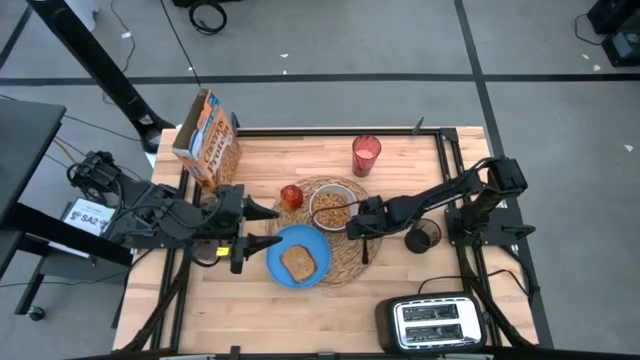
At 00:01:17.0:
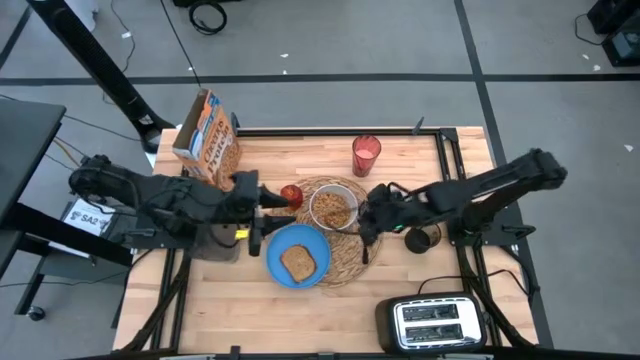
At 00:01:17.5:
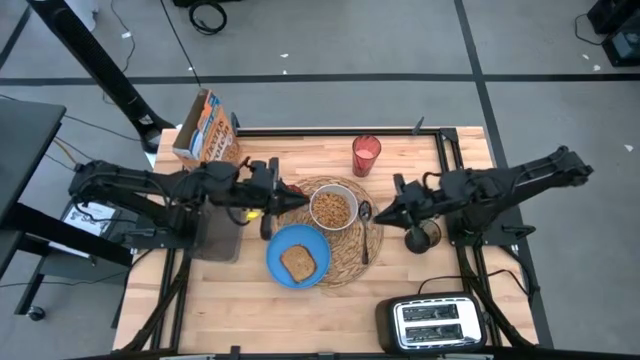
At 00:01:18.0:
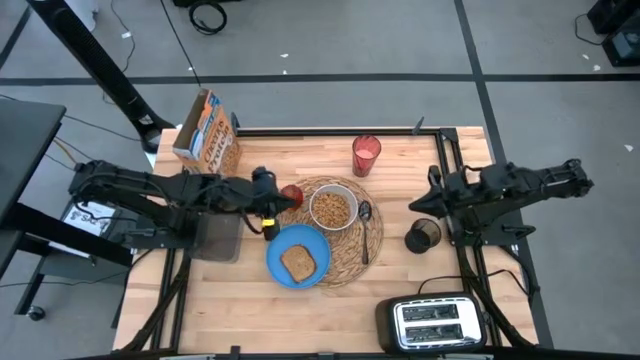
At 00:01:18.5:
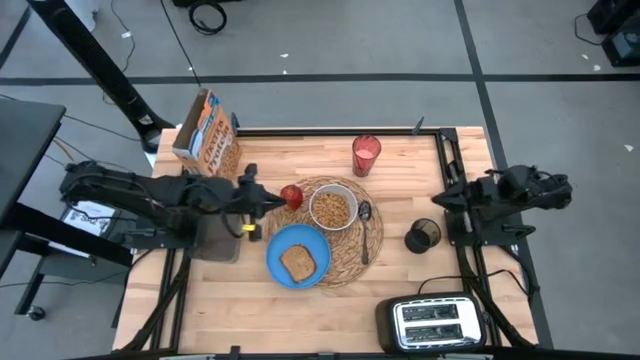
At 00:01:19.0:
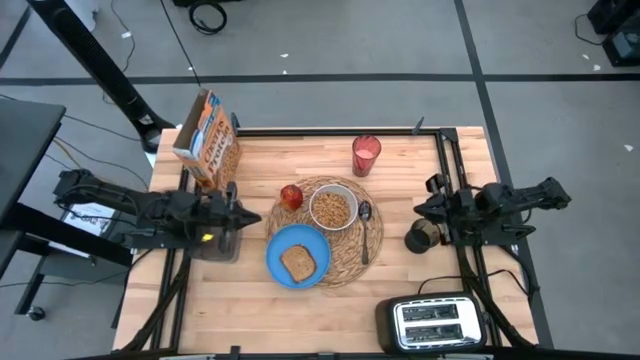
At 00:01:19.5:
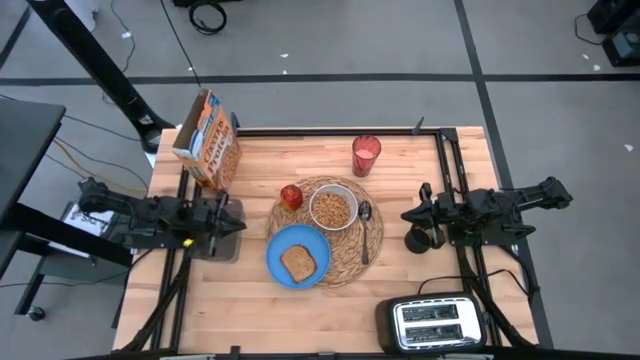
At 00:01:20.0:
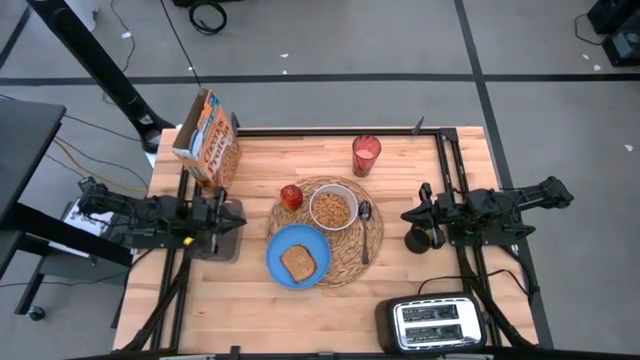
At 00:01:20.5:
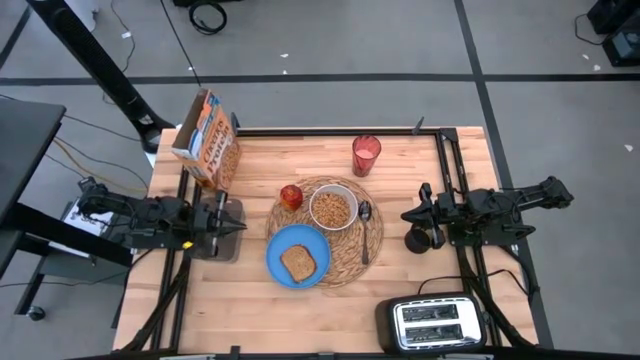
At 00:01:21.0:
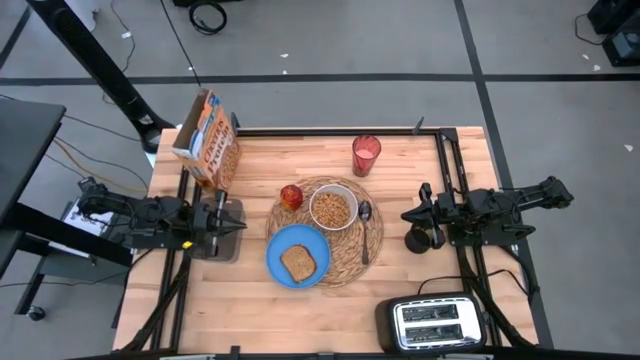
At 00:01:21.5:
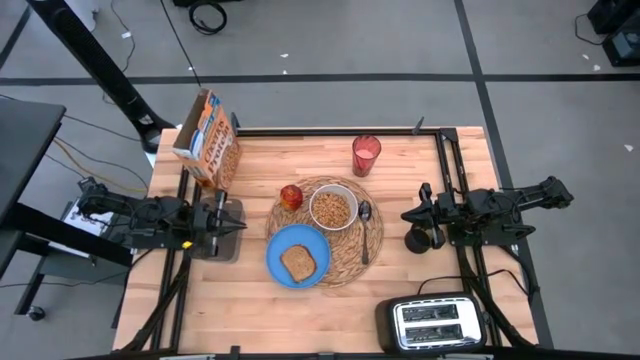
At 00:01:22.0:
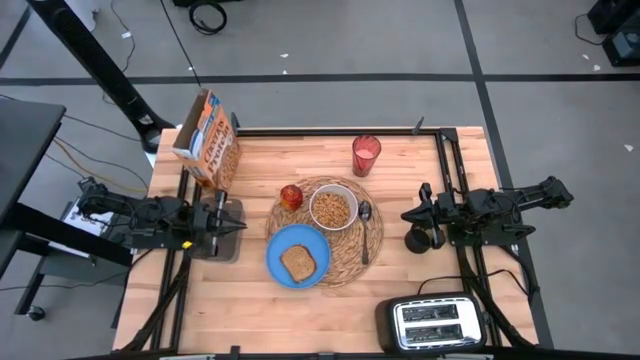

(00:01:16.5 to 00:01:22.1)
Task: Arrange a breakfast setting
Return to Home Position

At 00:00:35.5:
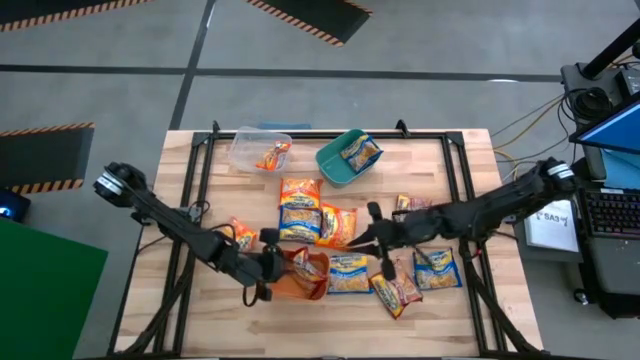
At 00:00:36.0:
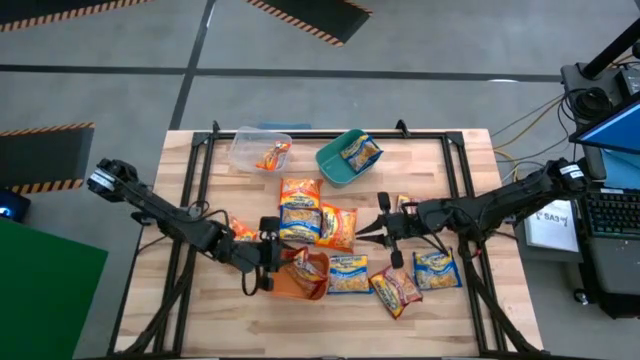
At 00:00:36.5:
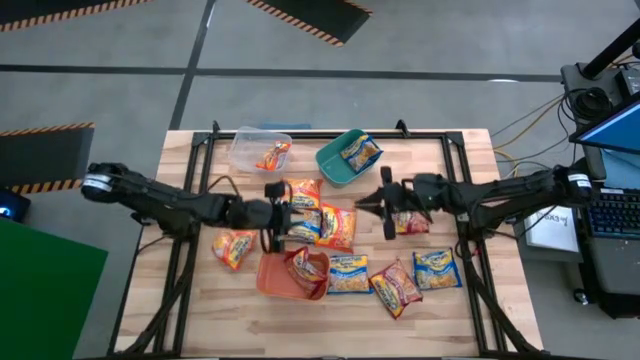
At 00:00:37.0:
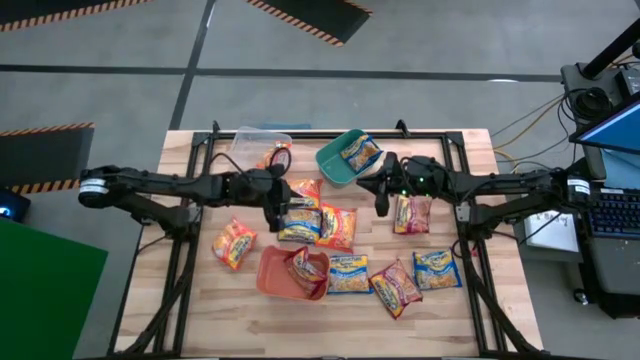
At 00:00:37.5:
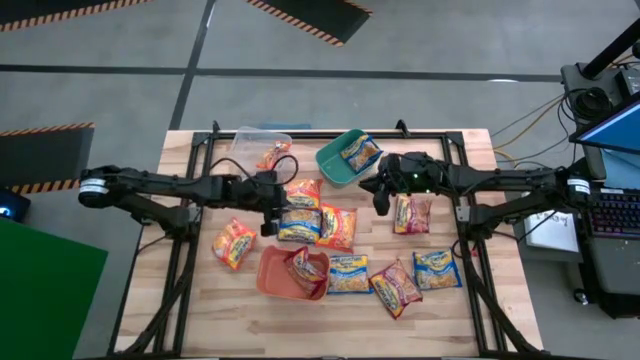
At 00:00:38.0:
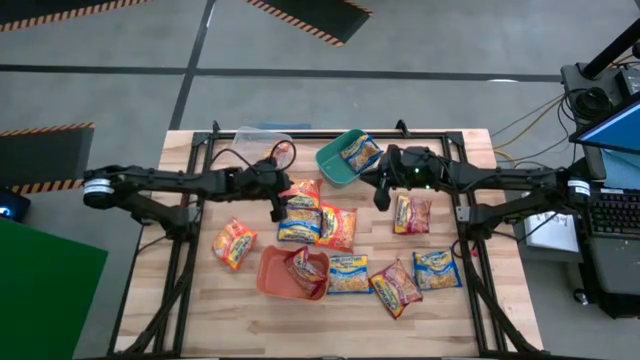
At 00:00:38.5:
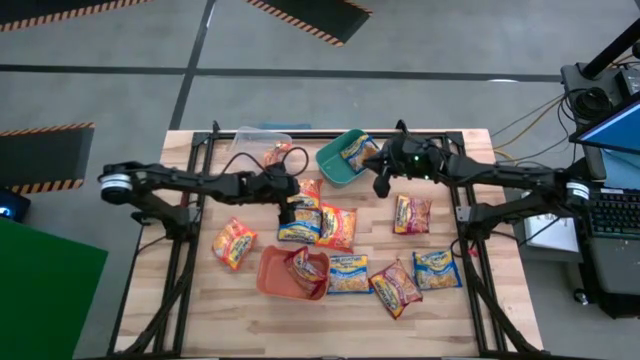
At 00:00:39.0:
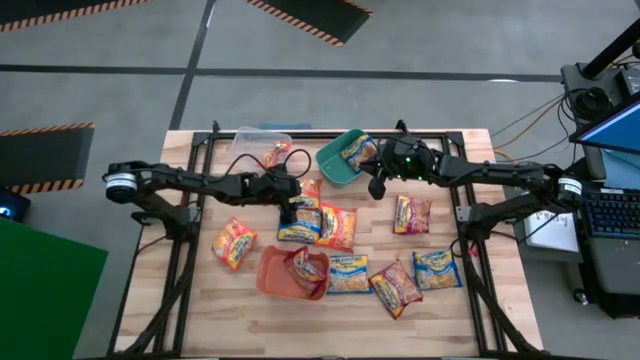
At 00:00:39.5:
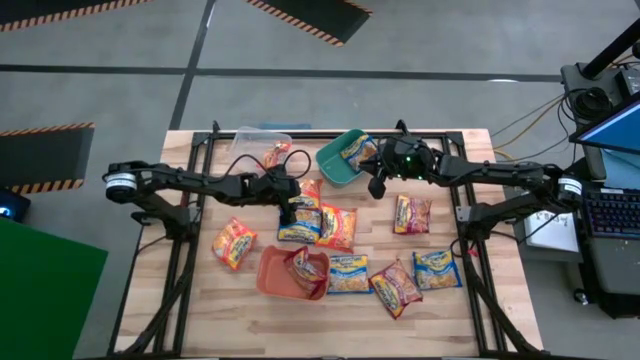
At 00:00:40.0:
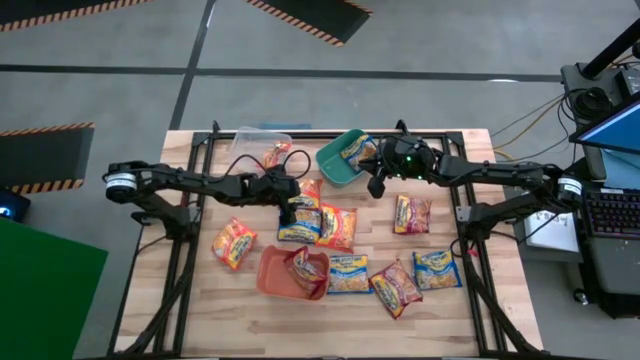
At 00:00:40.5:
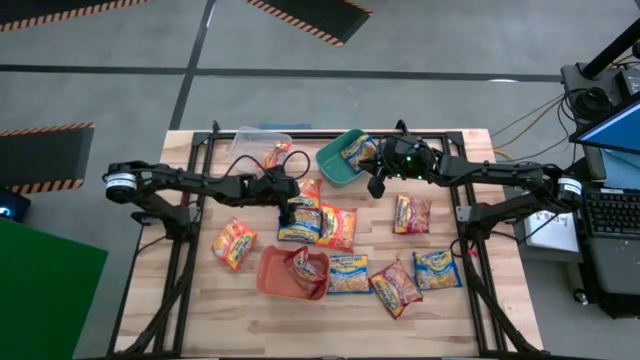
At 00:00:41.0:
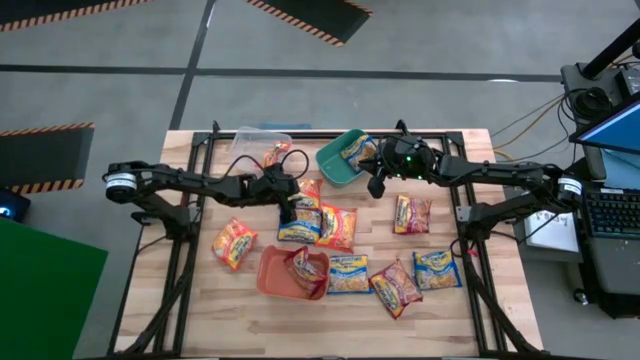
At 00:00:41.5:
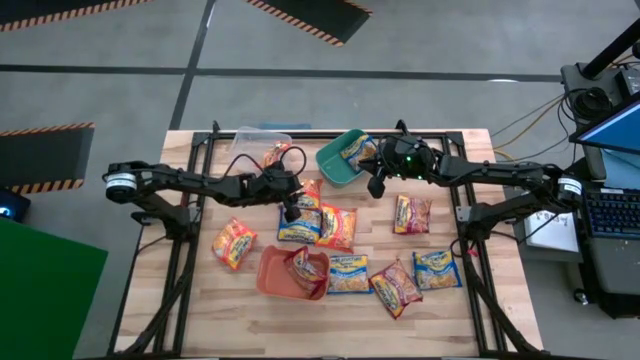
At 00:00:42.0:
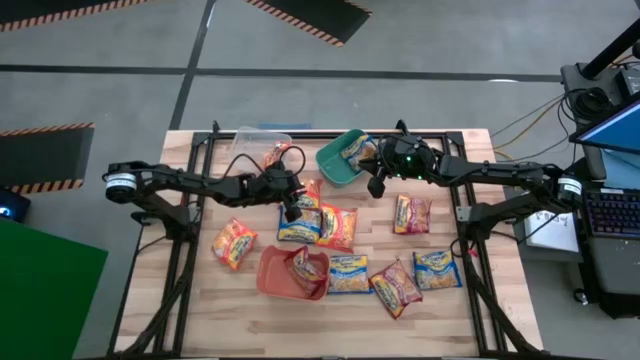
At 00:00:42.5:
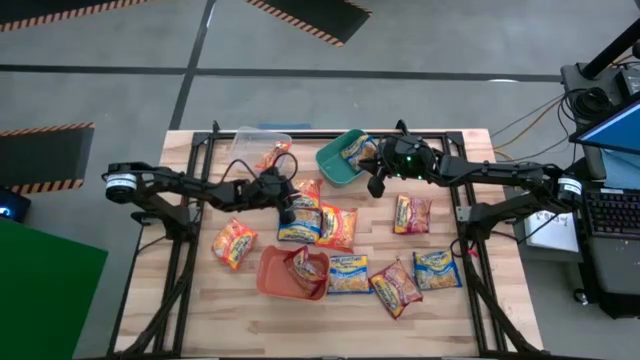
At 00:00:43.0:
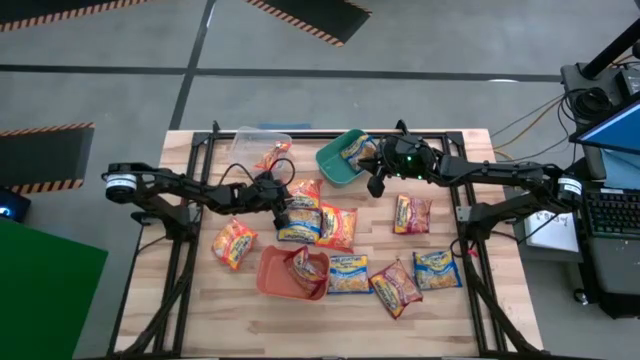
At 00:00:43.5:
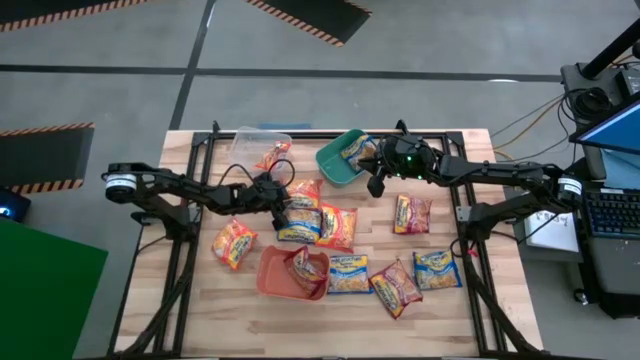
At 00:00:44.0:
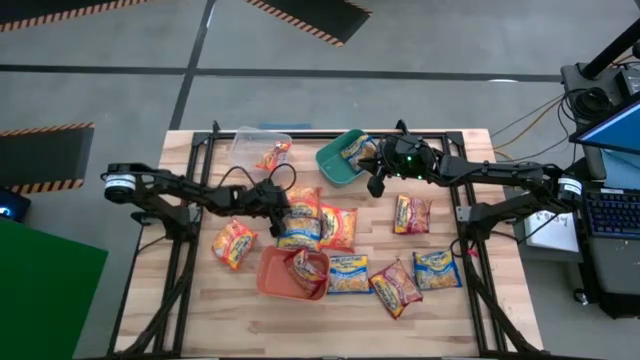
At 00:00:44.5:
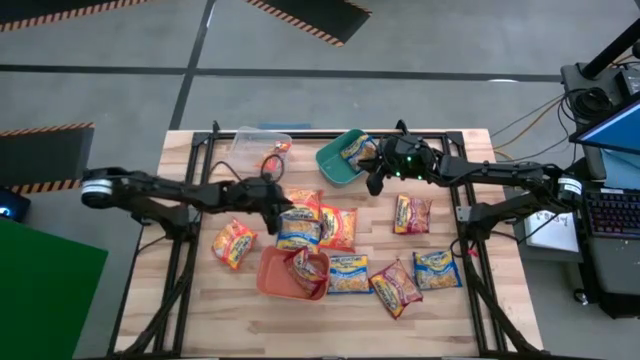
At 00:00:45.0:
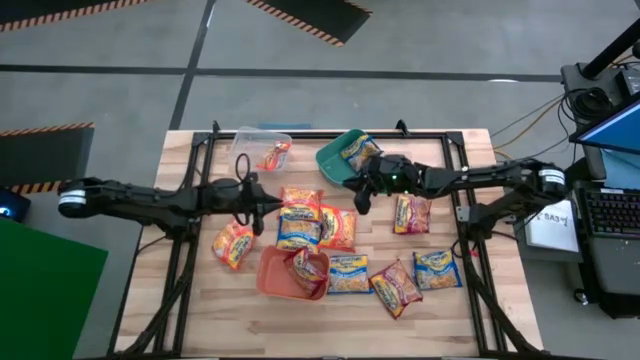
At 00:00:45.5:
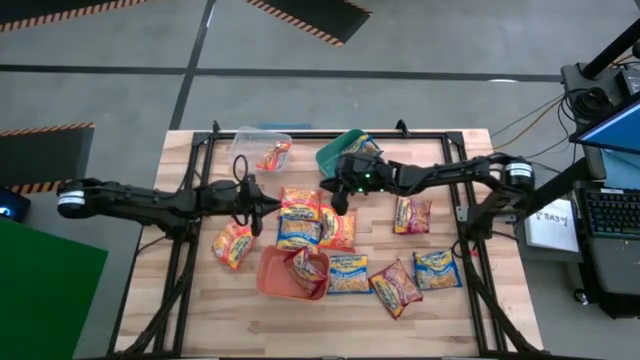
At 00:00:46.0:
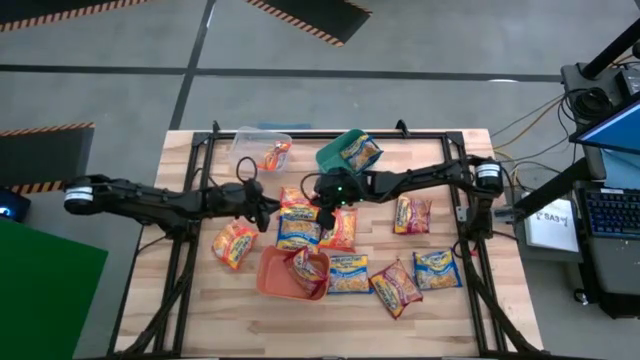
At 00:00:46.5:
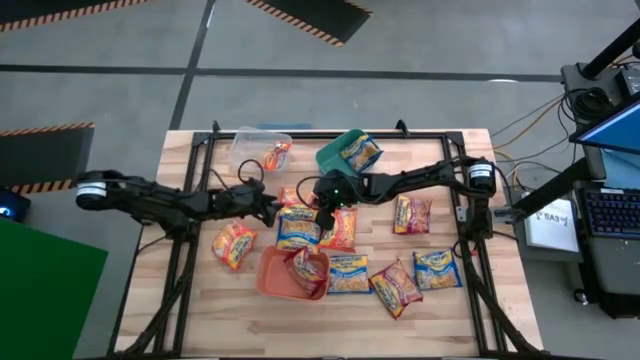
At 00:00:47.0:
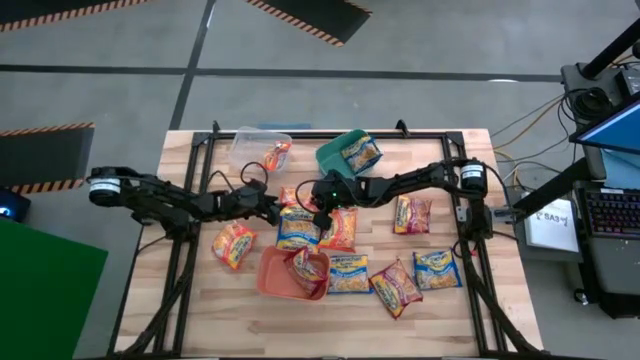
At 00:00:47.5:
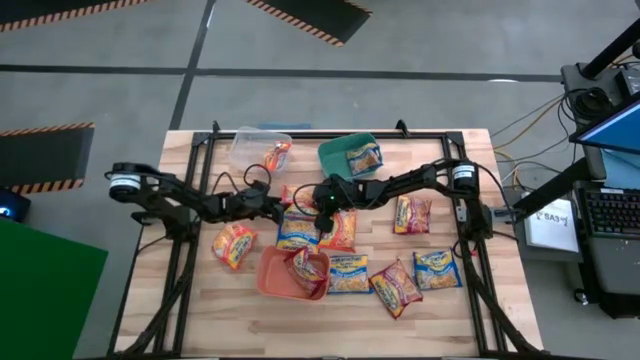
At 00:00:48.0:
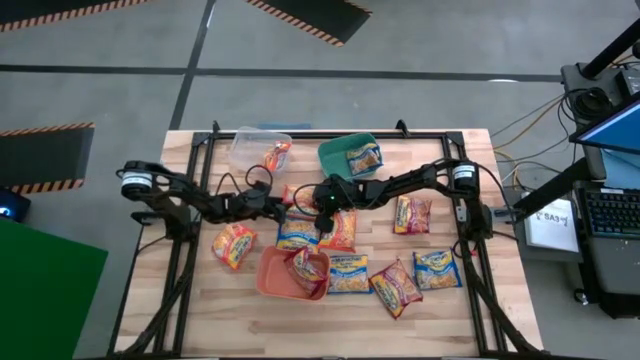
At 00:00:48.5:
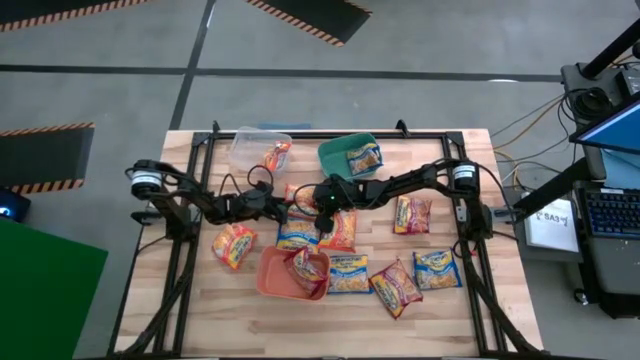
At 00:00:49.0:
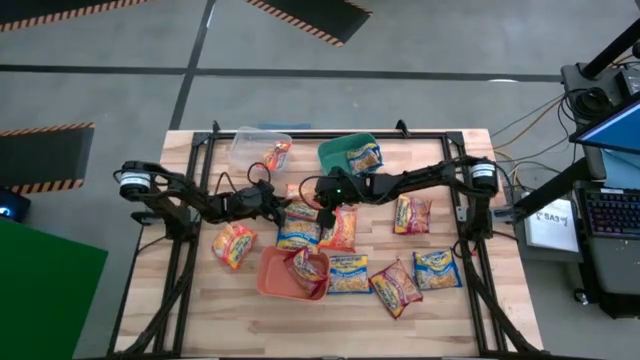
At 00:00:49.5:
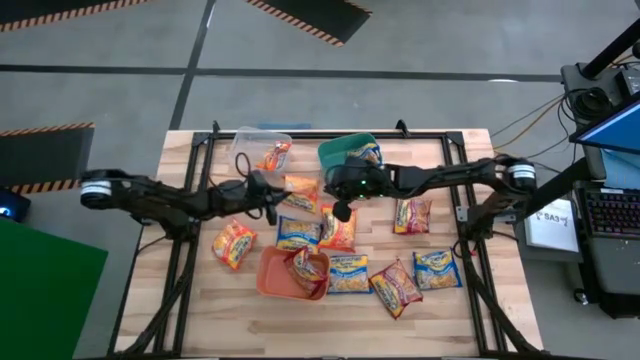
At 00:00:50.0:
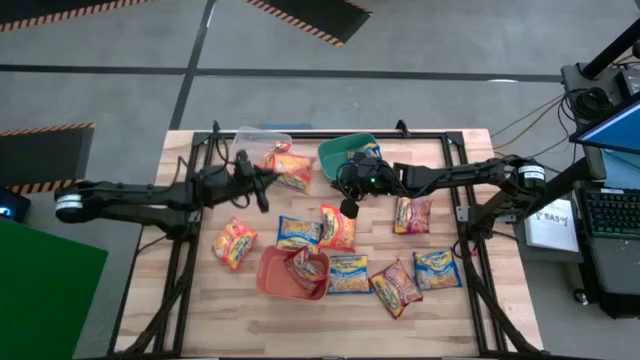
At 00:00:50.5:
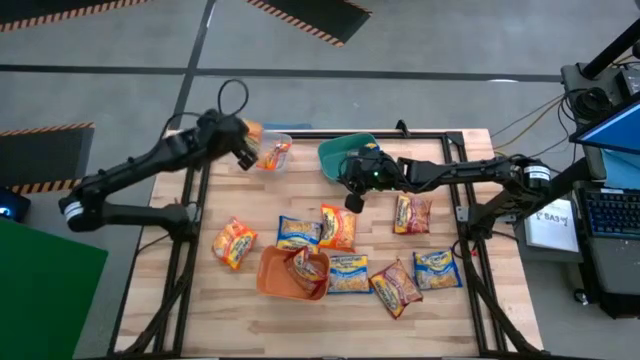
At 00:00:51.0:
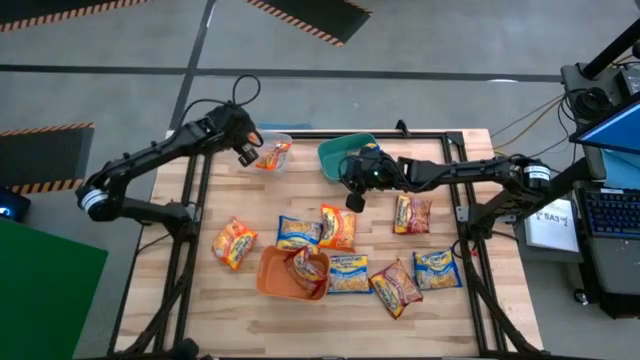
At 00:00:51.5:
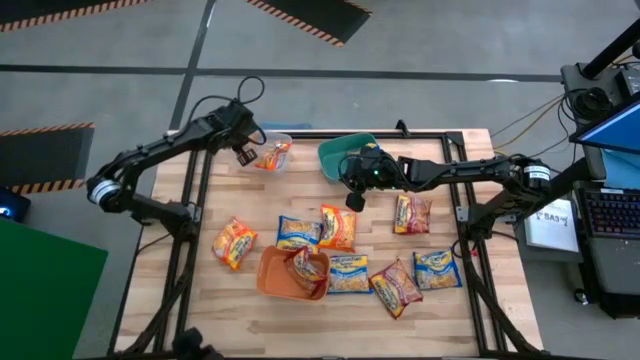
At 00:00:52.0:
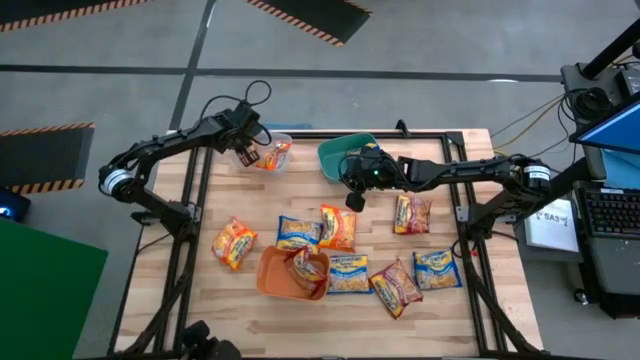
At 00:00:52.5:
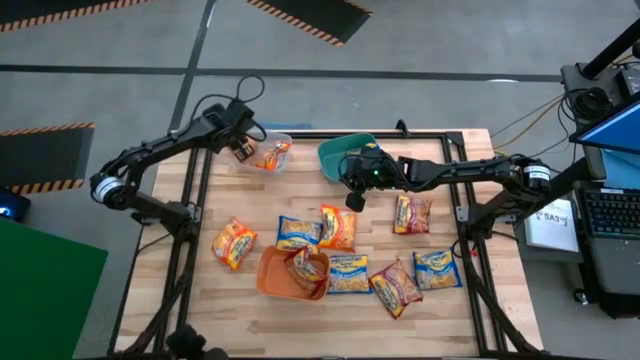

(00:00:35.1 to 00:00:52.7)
Task: Sort Maruchan noodles
Put the orange noodle pack into the transparent bin
